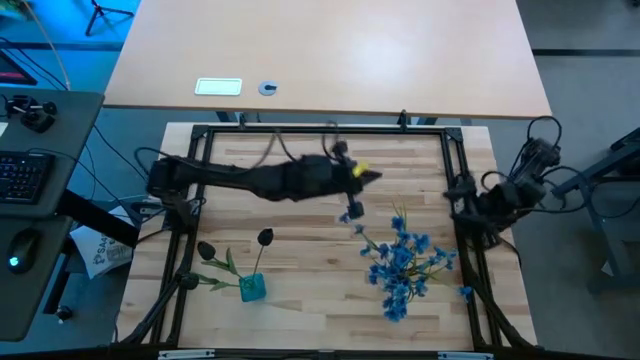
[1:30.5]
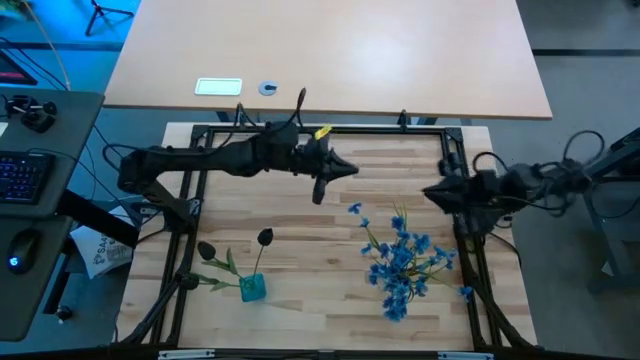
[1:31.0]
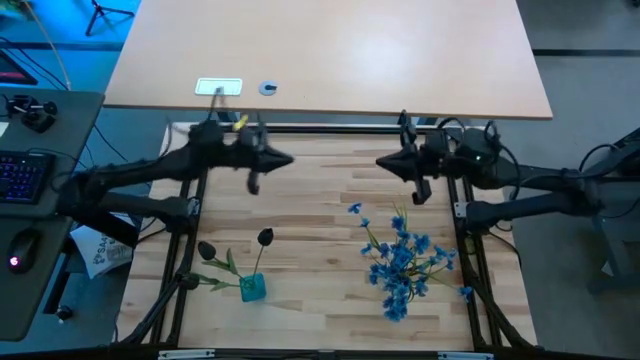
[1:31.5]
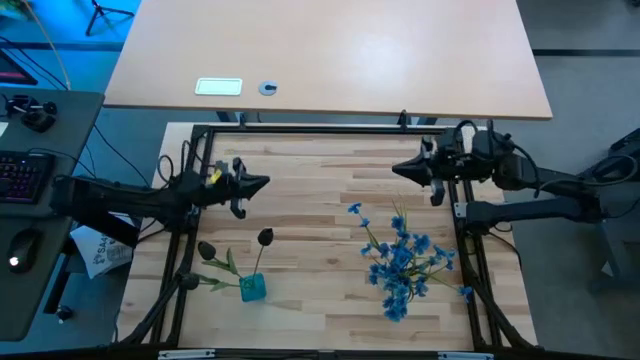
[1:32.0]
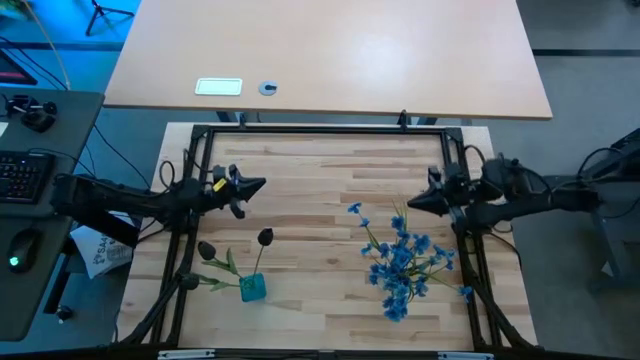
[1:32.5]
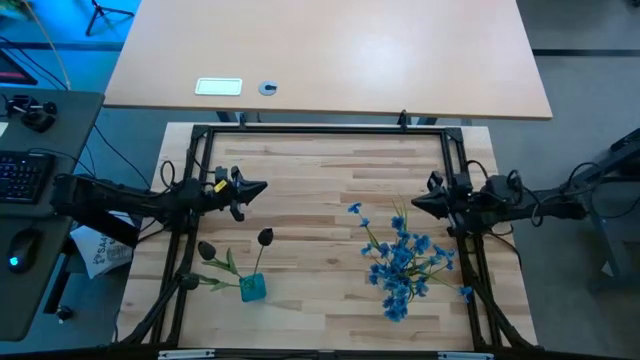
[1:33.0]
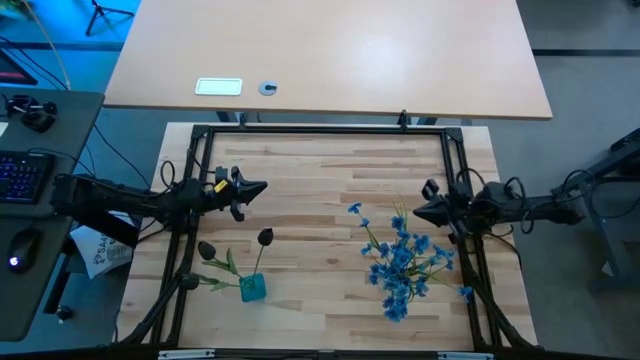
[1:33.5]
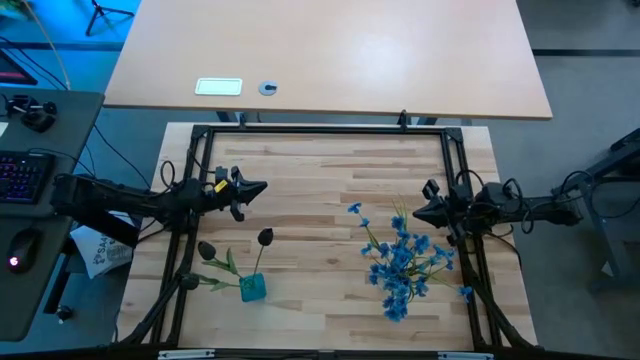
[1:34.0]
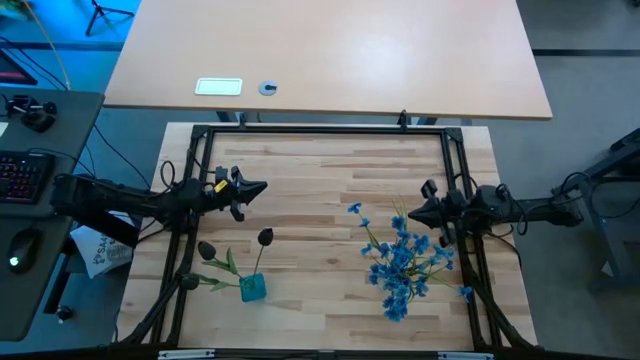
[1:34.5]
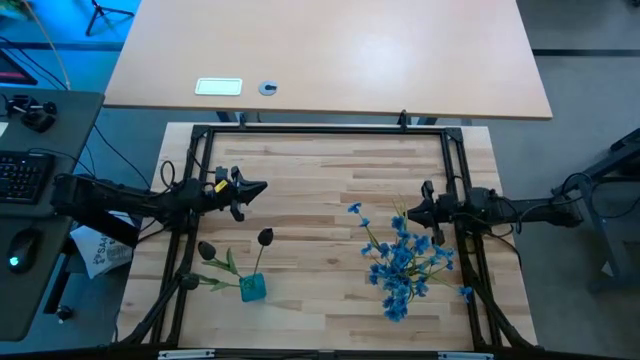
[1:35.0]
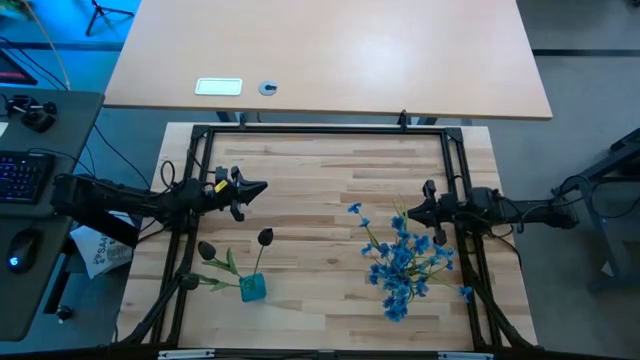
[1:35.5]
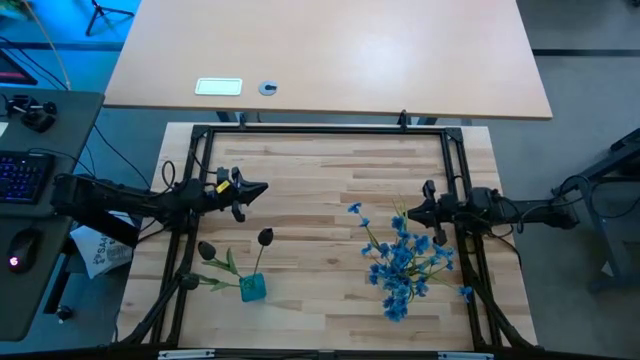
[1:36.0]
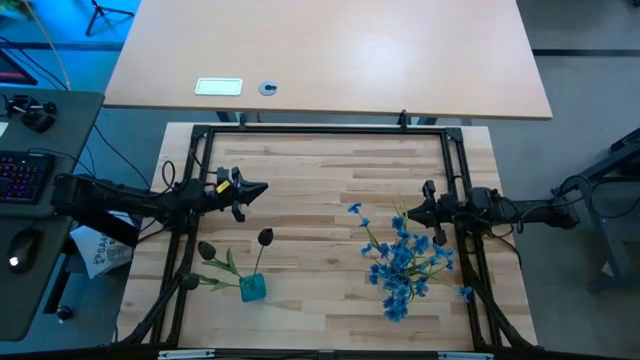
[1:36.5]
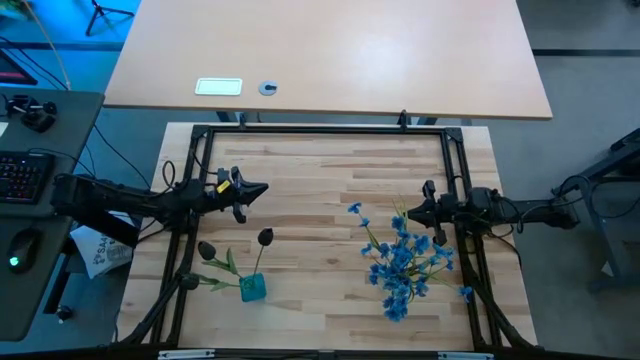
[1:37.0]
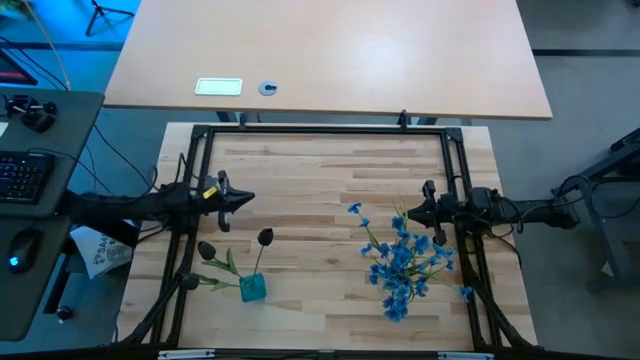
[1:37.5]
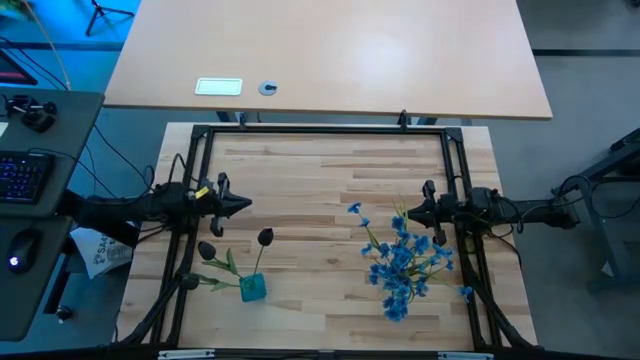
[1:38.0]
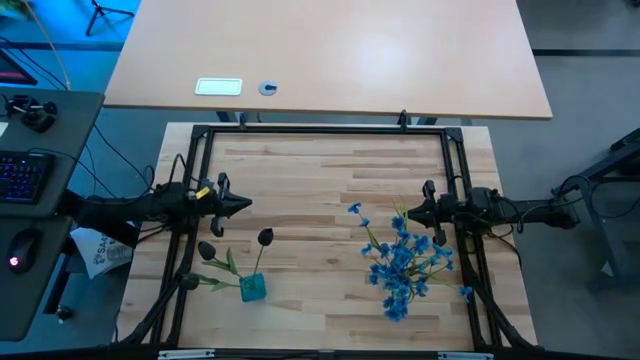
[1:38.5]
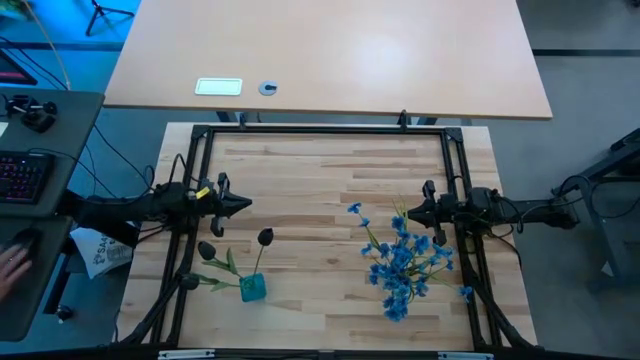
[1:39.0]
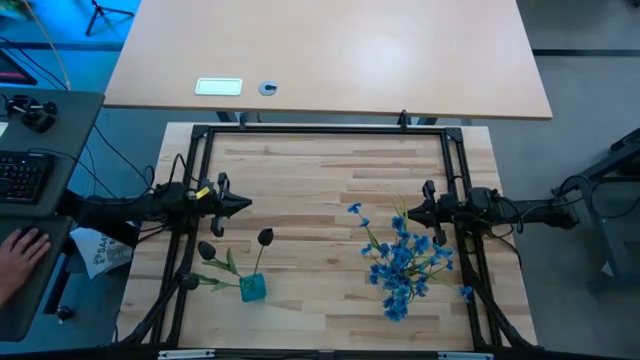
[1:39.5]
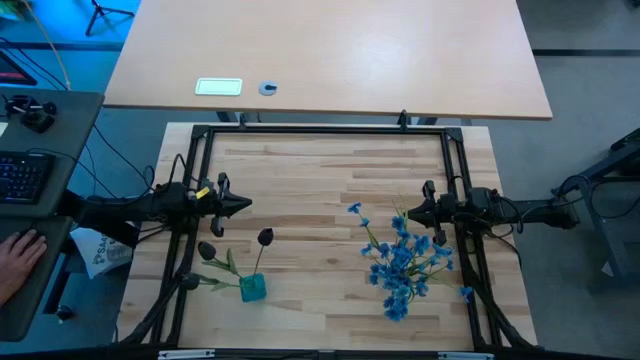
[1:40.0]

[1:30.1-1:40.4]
Task: Sort flowers into vase by color
Return to Home Position

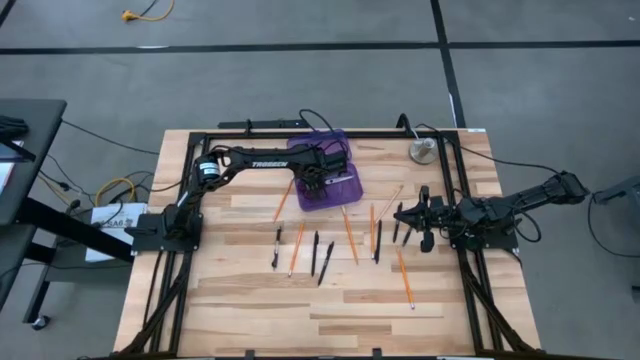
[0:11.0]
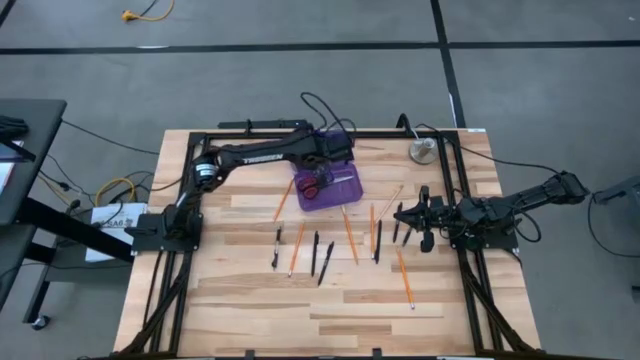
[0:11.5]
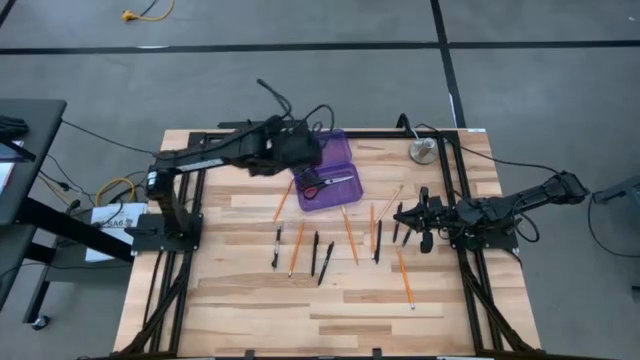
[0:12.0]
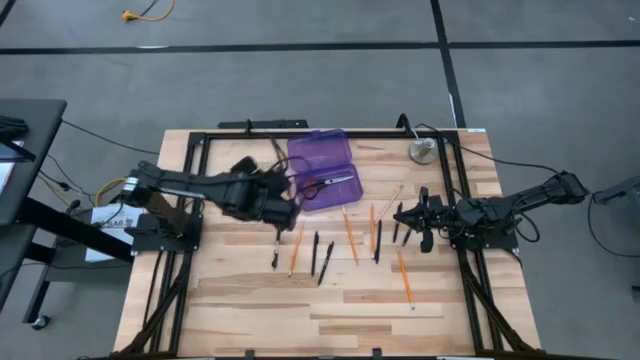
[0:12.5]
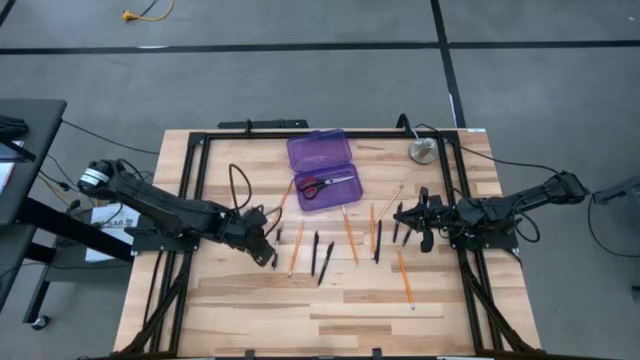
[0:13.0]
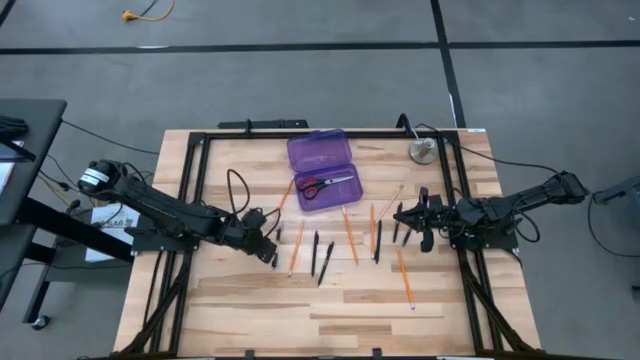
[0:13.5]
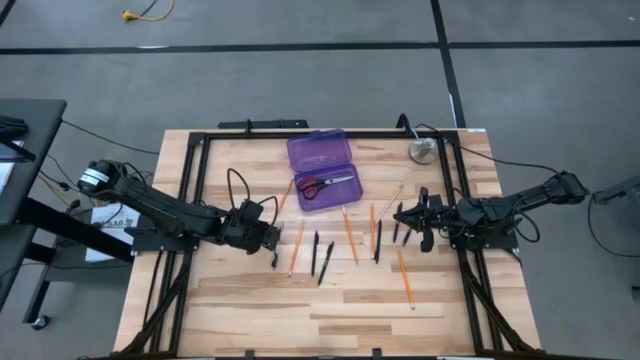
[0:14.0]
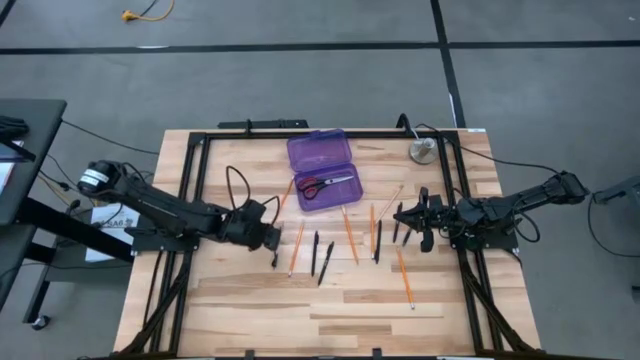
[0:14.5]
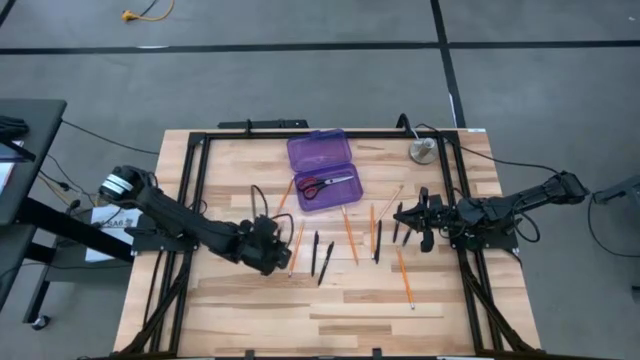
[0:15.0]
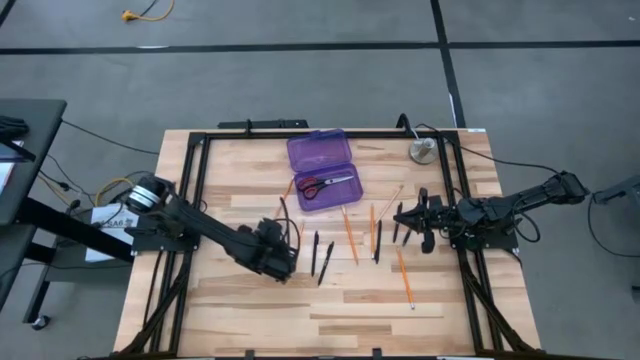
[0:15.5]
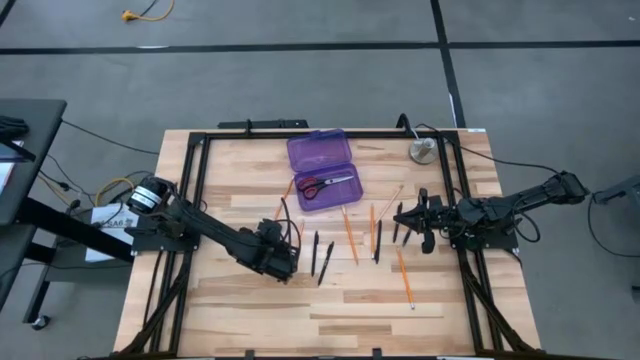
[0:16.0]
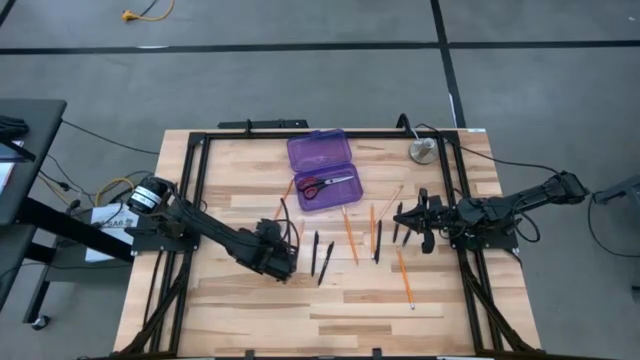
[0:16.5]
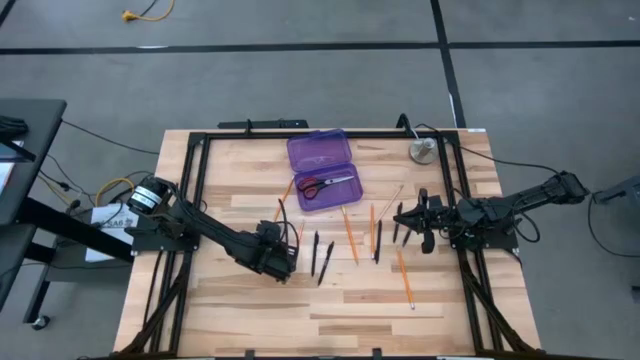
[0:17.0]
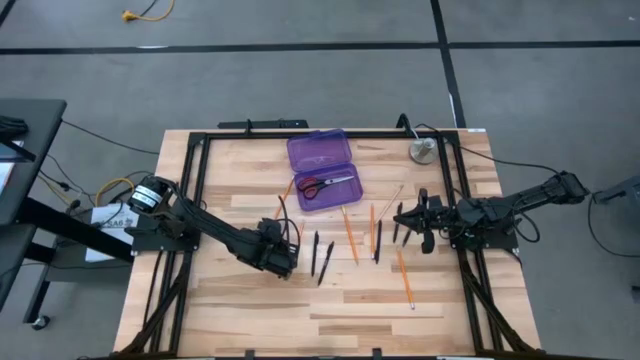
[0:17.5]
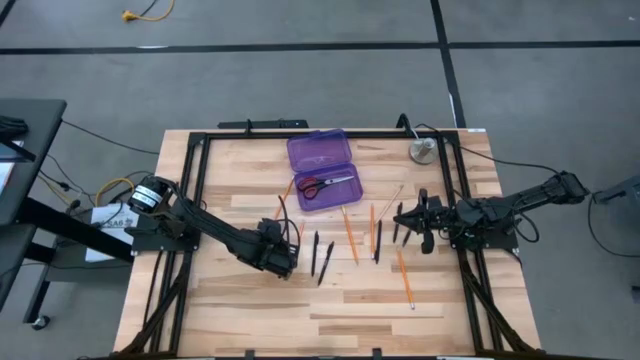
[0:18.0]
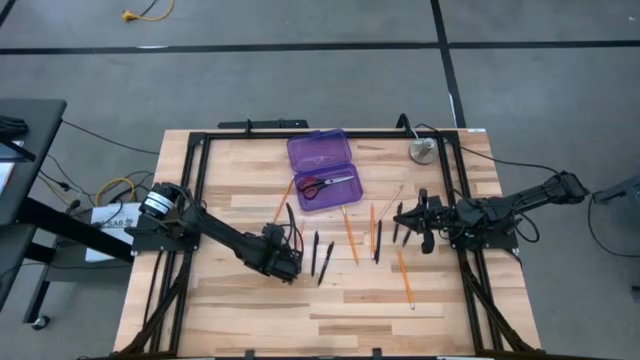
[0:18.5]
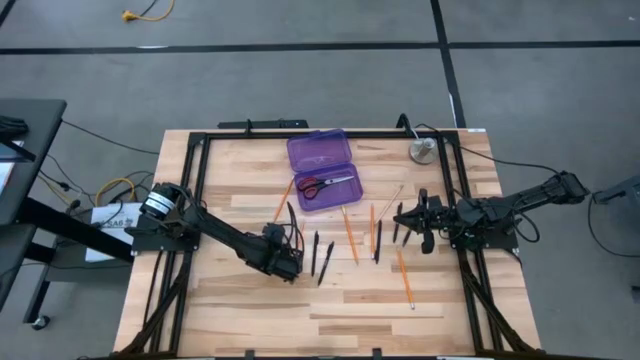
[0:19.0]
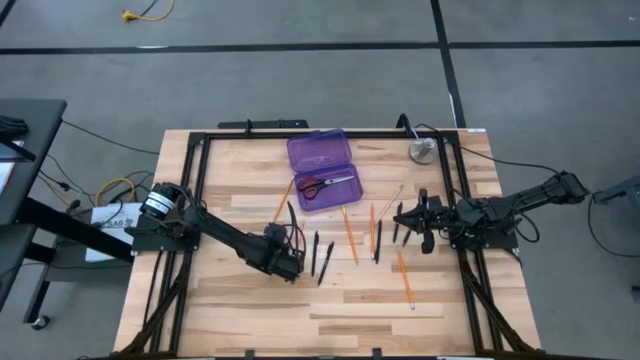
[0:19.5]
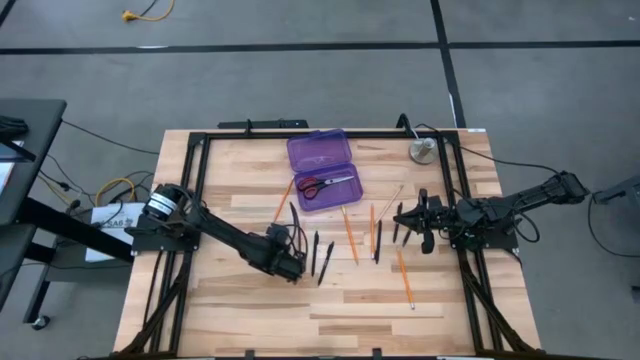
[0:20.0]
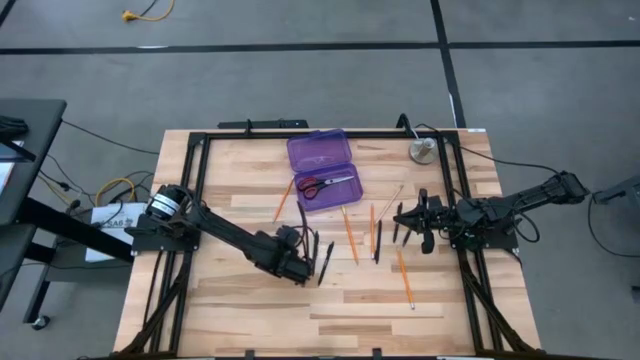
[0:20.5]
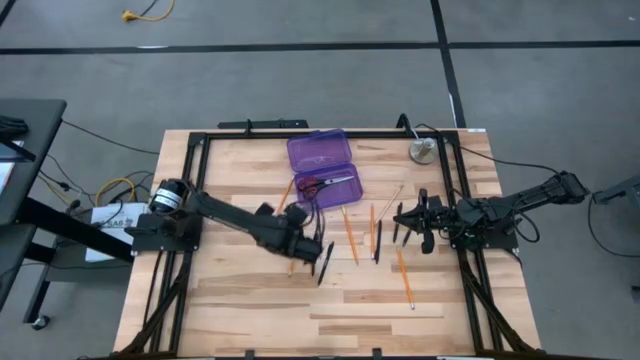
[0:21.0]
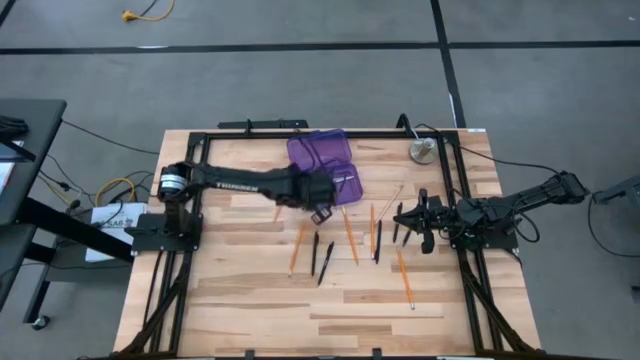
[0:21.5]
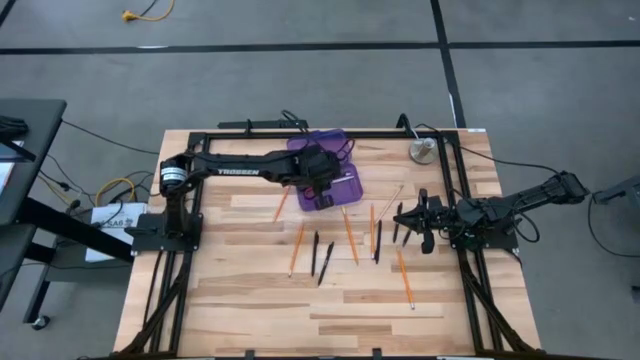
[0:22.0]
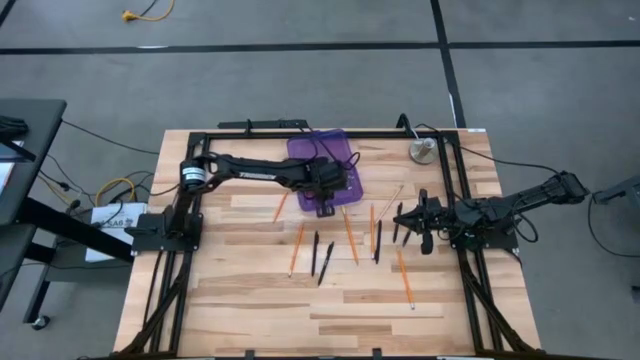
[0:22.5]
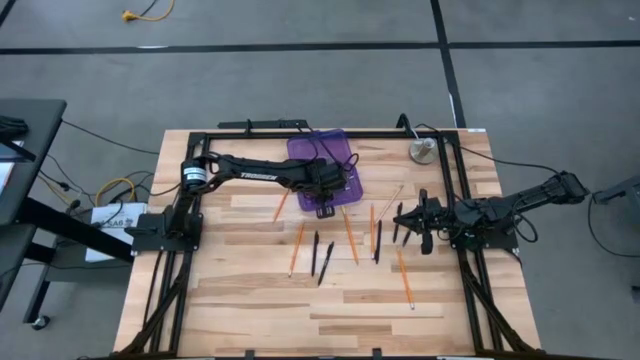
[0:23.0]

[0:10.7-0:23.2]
Task: Pick & place school supplies into a supply box
Put the black pen into the purple supply box
